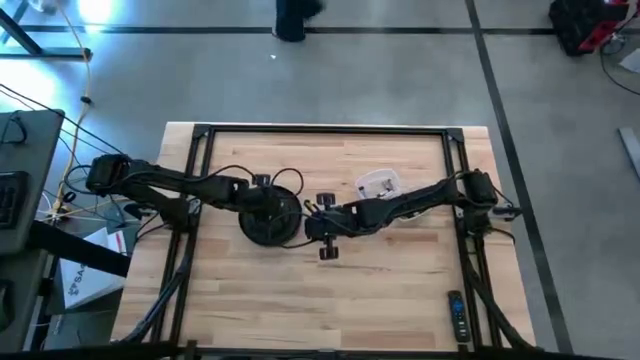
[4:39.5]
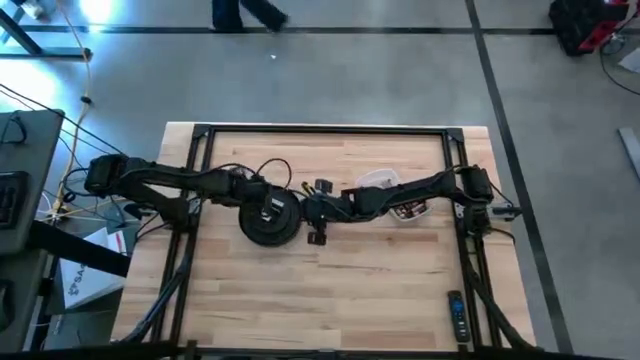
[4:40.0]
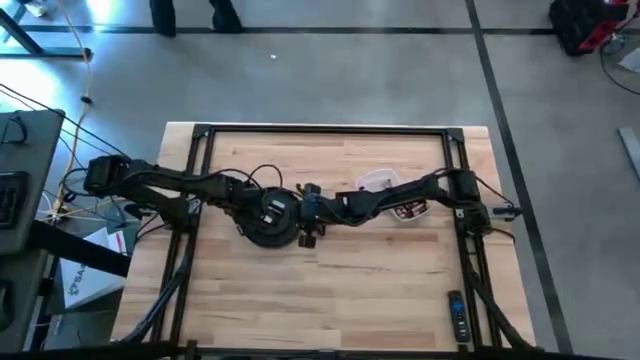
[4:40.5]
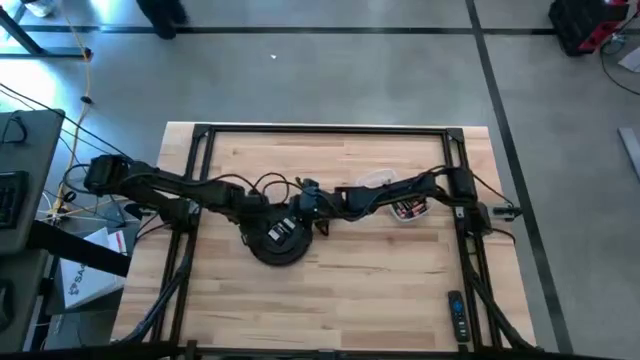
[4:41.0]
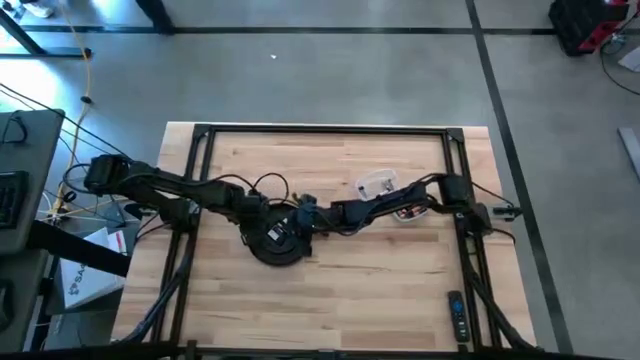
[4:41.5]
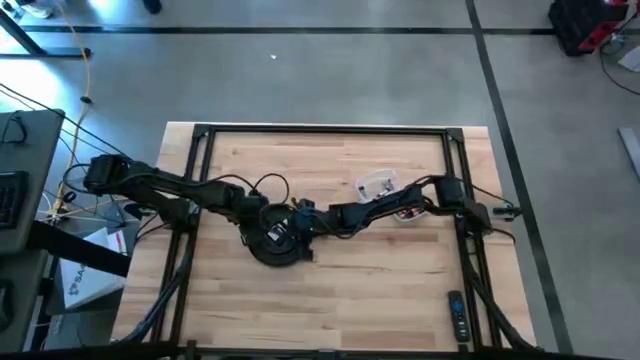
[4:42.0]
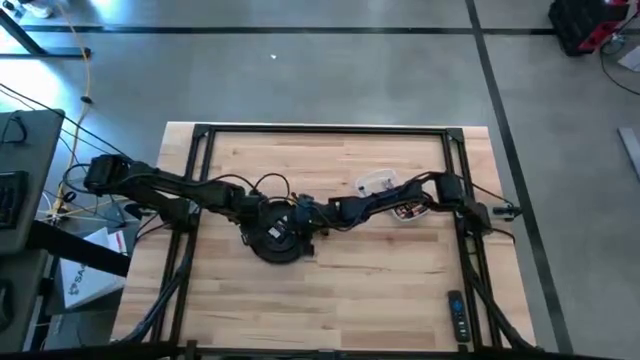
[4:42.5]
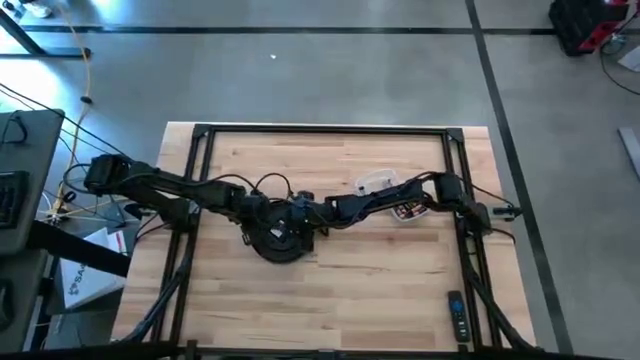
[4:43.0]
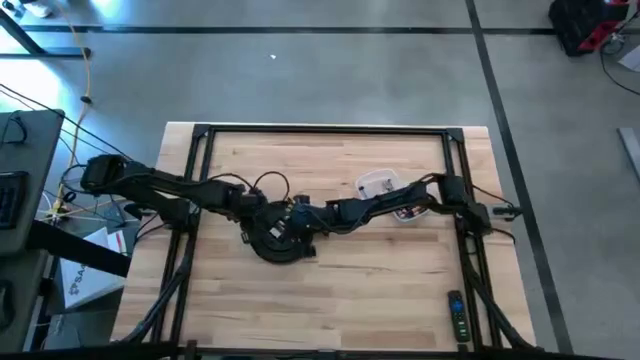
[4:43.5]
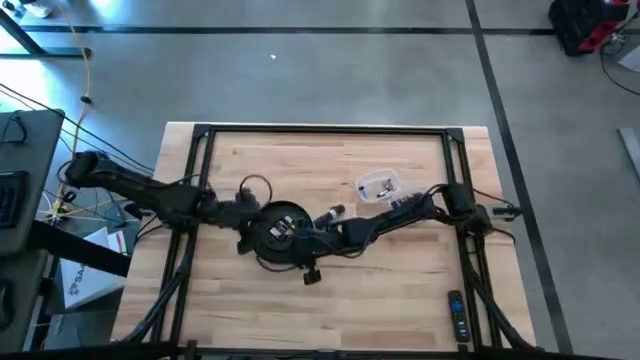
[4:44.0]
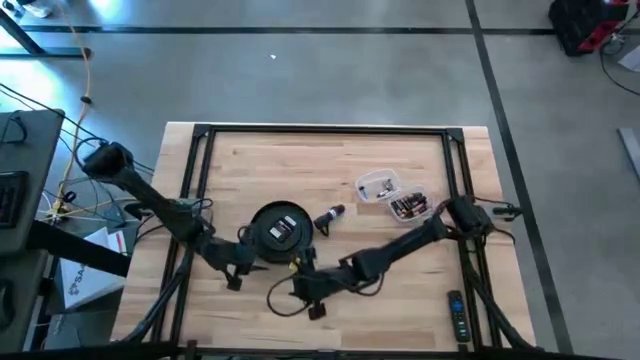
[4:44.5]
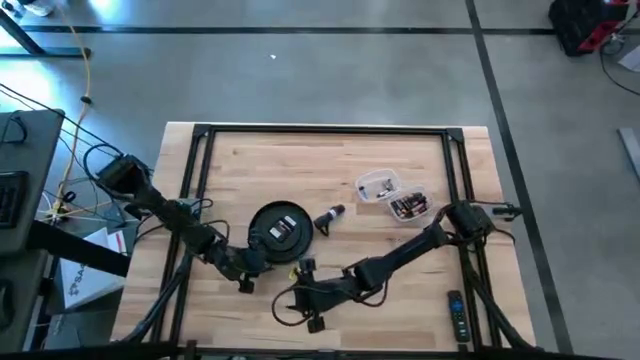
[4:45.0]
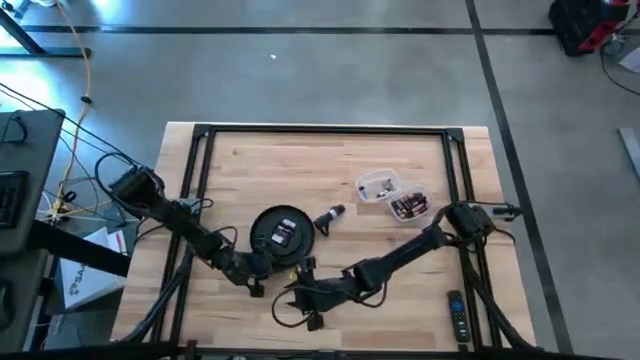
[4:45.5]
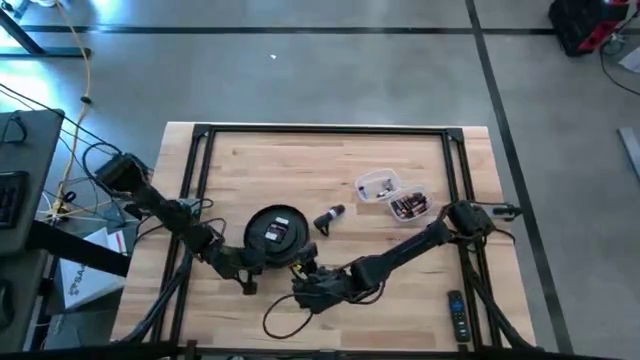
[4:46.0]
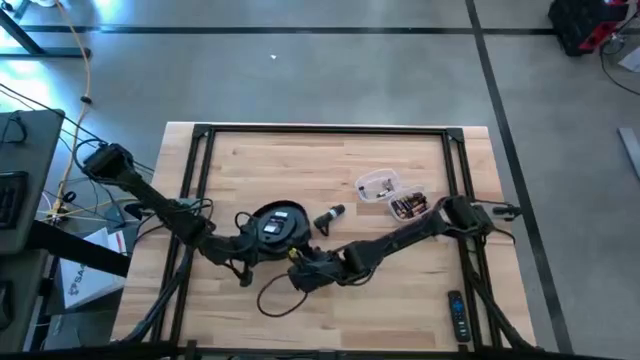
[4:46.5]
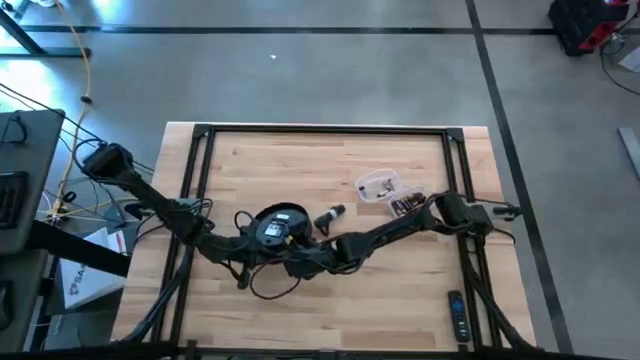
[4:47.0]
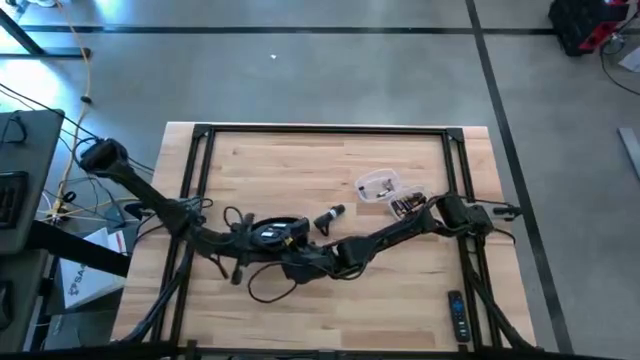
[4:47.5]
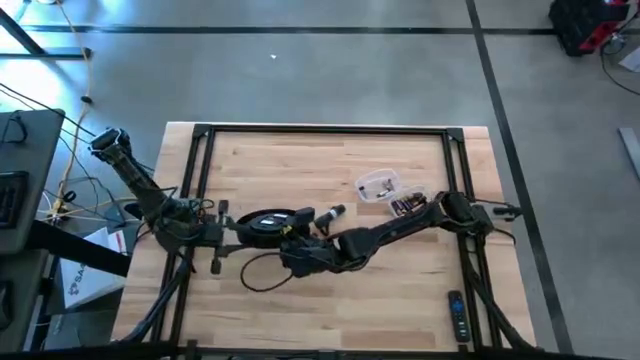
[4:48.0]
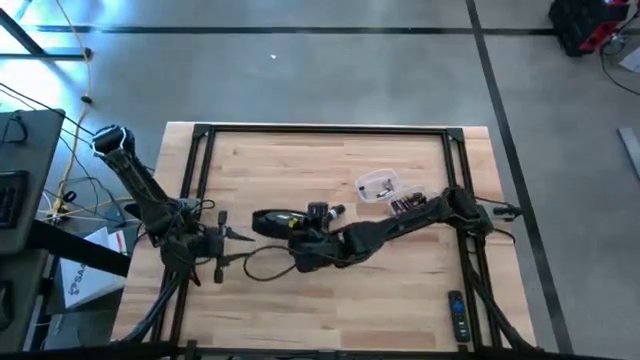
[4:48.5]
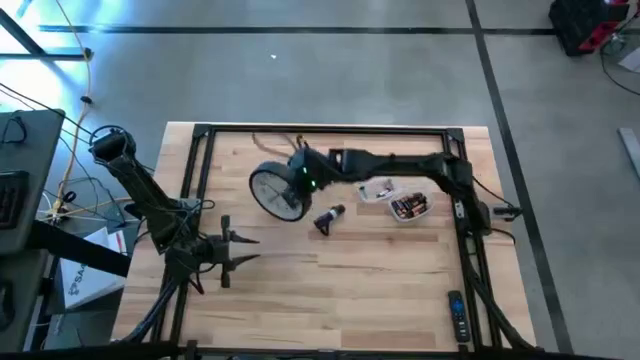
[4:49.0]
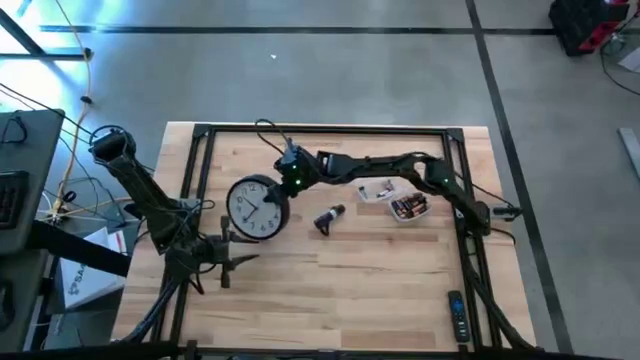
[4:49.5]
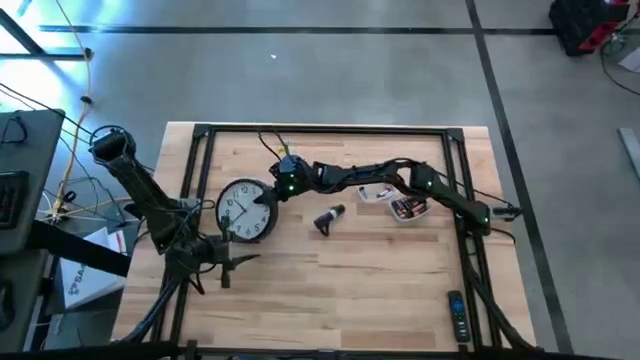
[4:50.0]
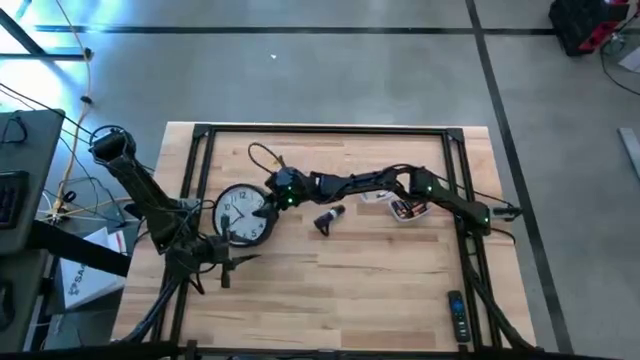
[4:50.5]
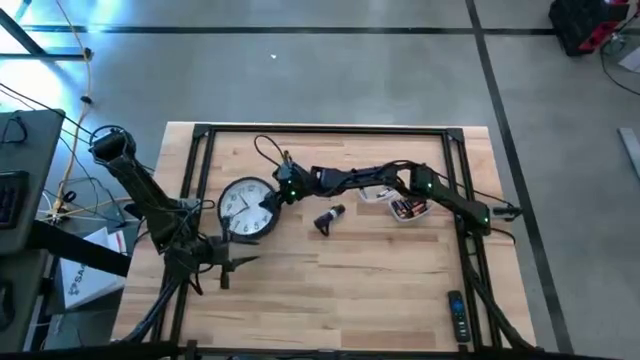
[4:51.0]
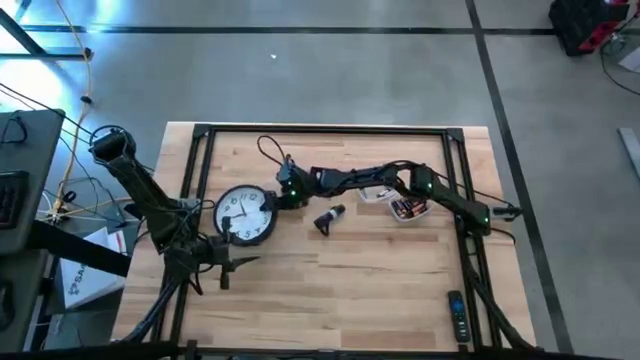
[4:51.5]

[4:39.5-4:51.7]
Task: Insert battery
Move the black wall clock to the middle left of the table

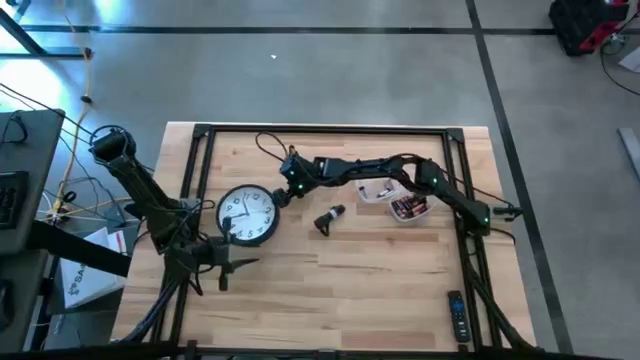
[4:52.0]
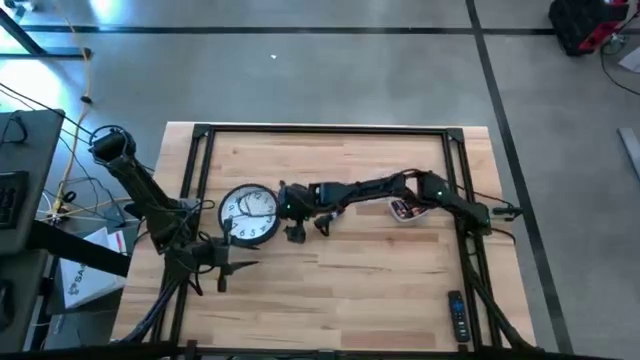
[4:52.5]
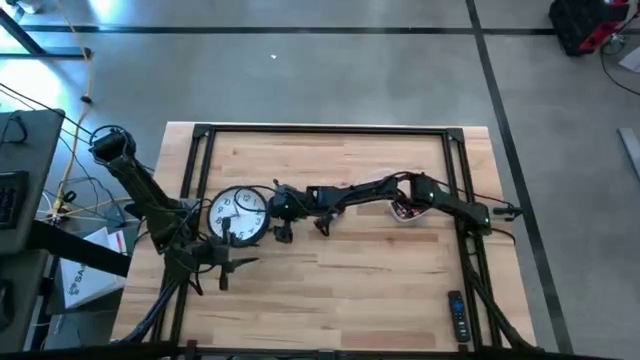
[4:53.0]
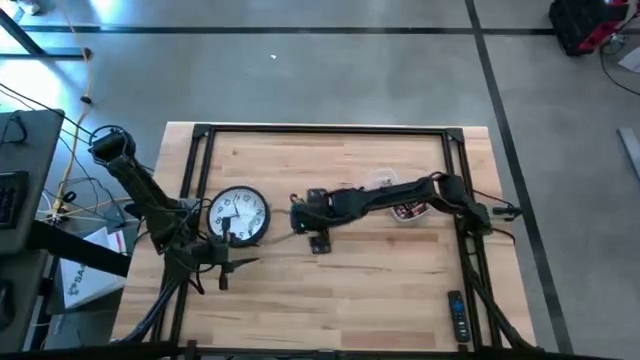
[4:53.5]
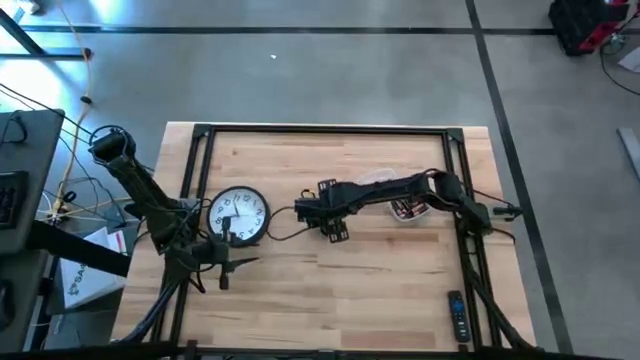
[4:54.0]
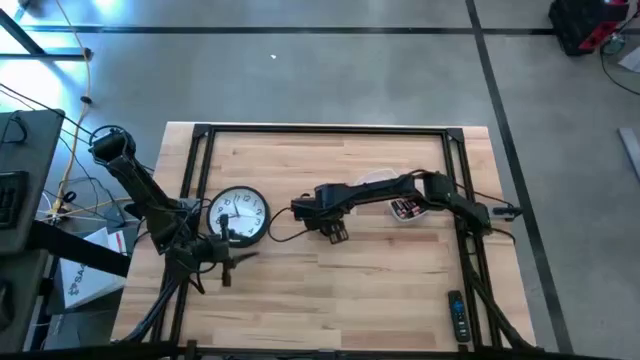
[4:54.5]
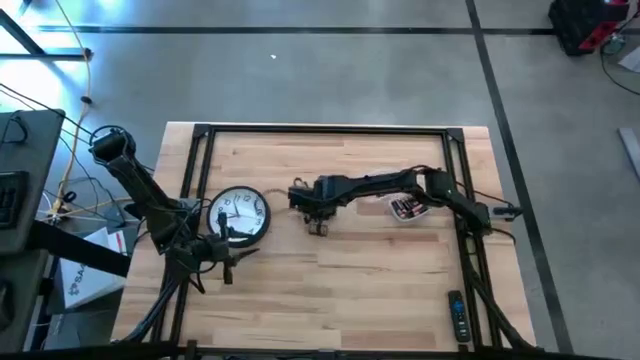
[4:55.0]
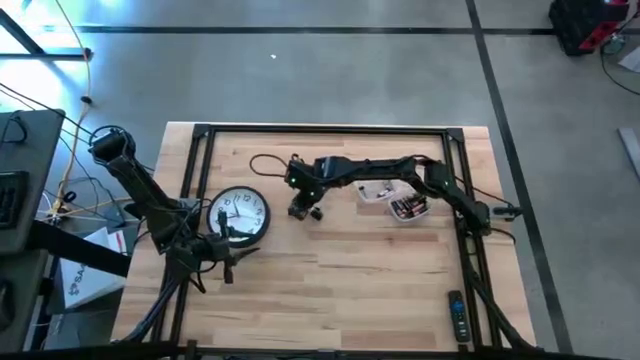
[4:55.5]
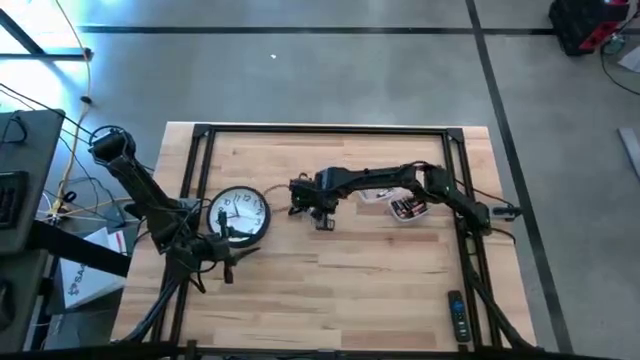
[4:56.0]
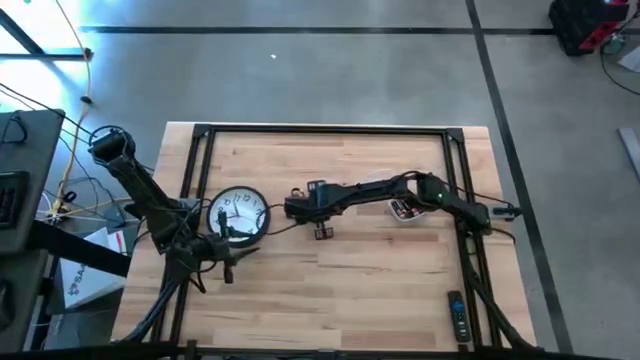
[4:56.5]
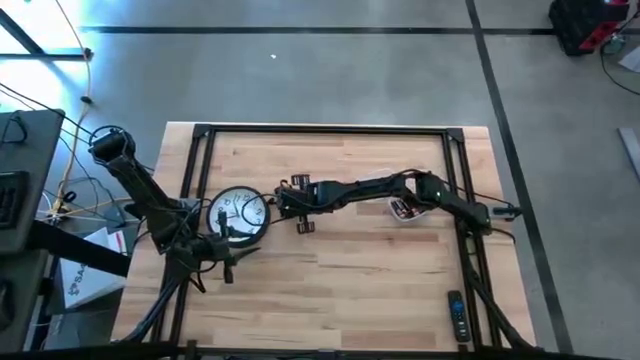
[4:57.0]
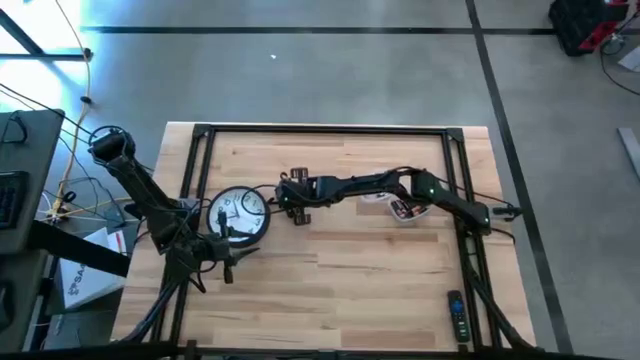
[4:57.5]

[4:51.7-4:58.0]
Adjust the black flashlight beside the black wall clock

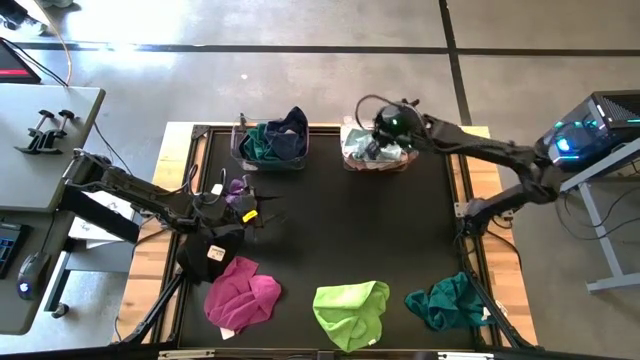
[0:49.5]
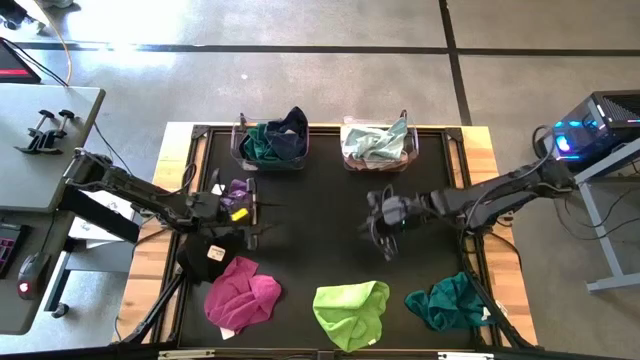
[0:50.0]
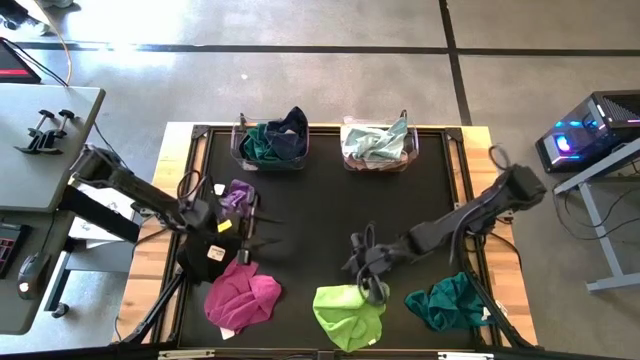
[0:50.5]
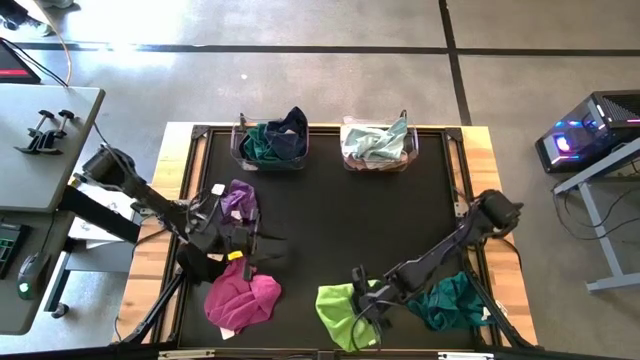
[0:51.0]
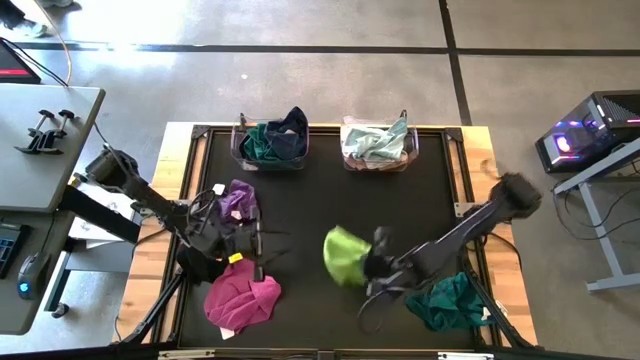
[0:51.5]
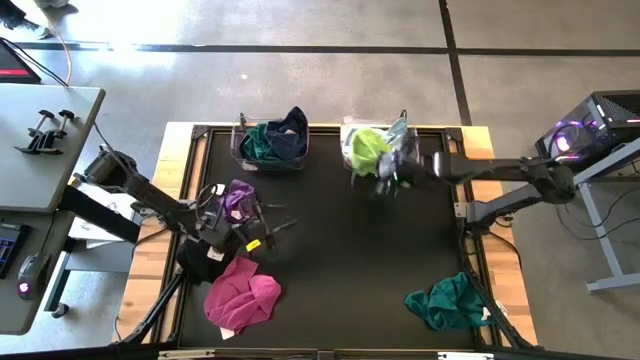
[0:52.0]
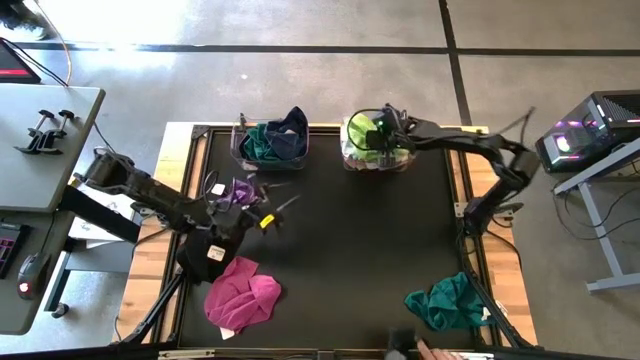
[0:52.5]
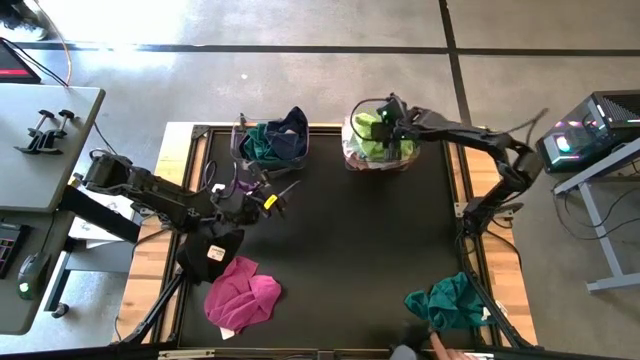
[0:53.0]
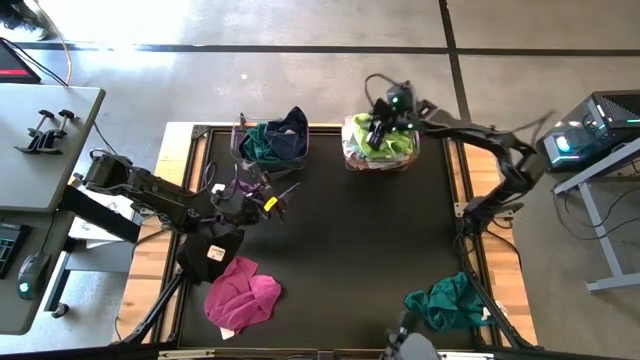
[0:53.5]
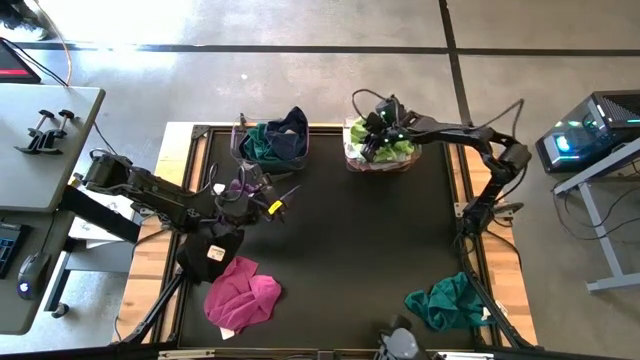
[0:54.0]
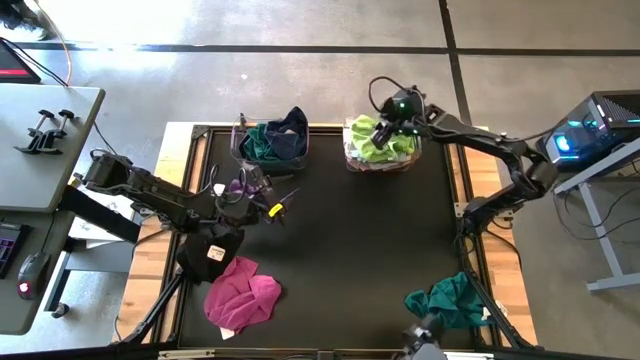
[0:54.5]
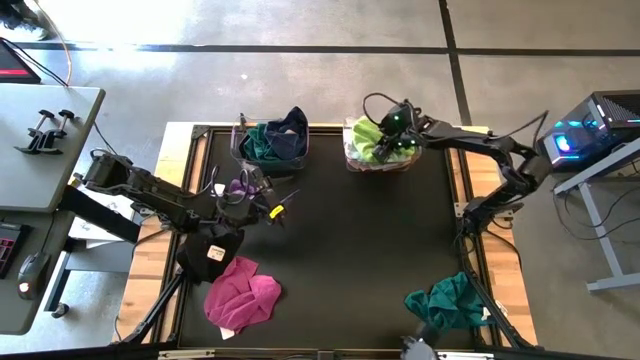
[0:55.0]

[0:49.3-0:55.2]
Task: Sort towels by color in basket
Put the light green microfiber towel into the right transparent bin
